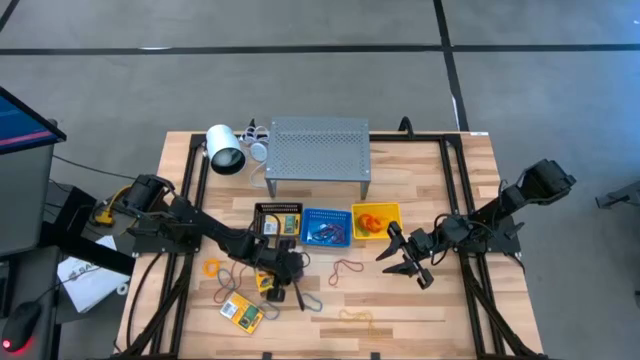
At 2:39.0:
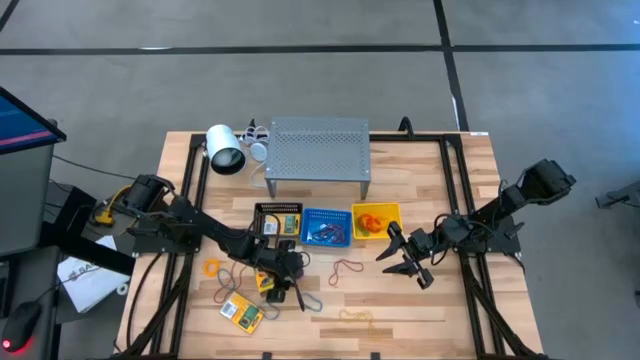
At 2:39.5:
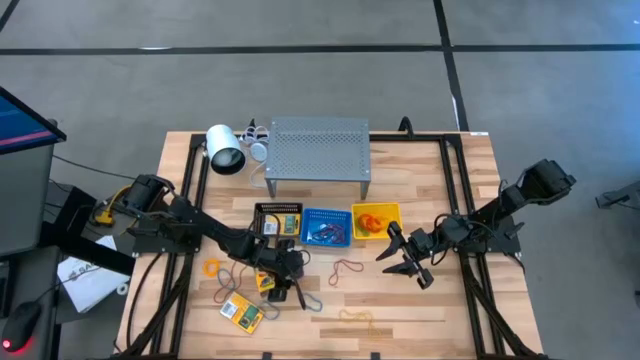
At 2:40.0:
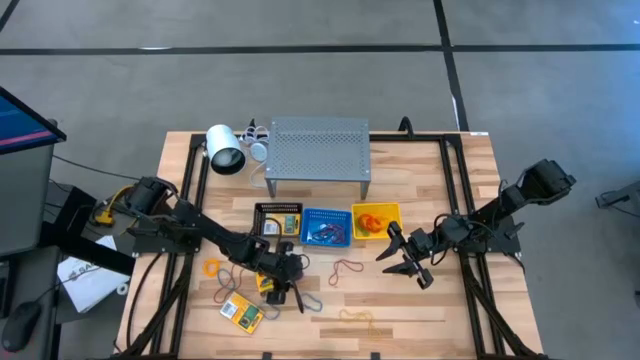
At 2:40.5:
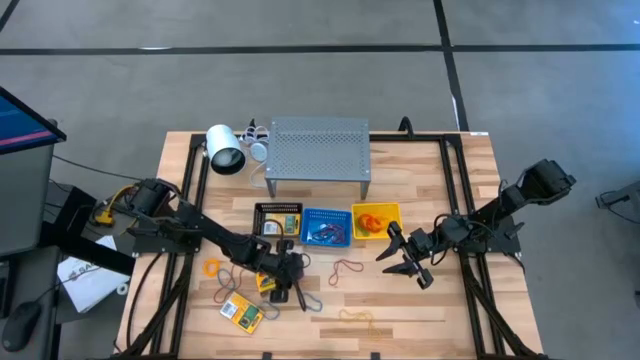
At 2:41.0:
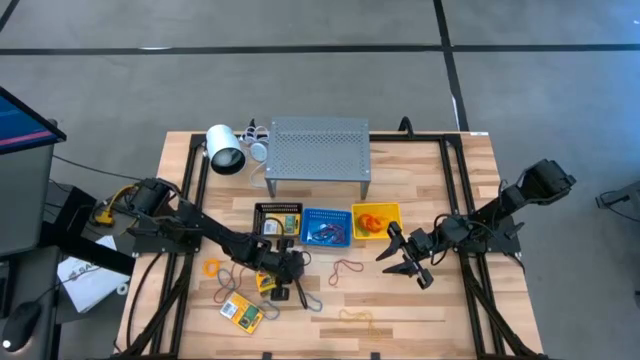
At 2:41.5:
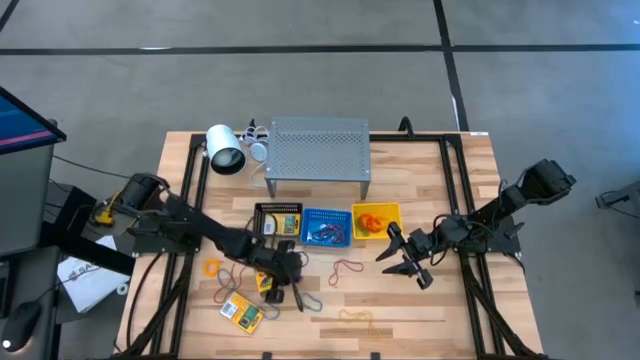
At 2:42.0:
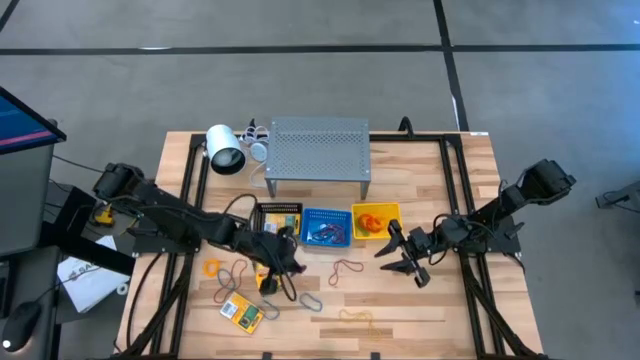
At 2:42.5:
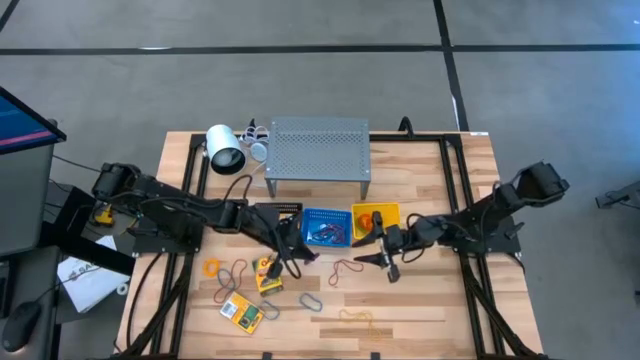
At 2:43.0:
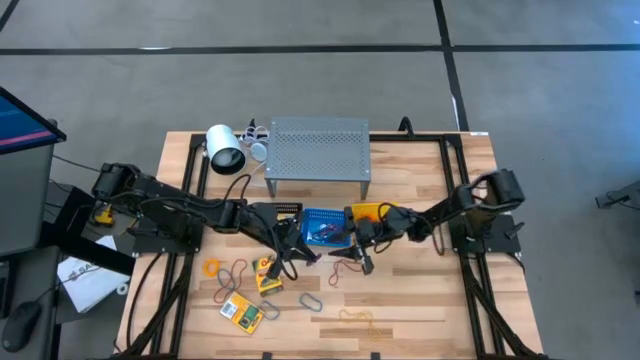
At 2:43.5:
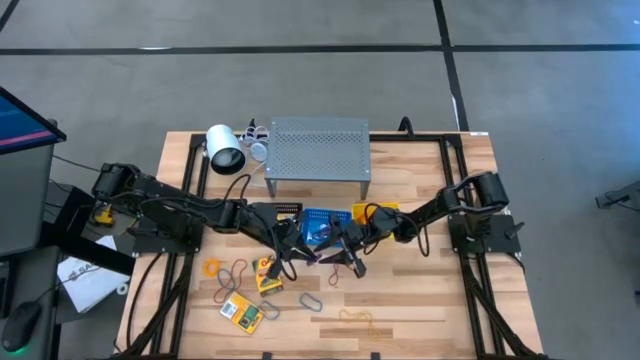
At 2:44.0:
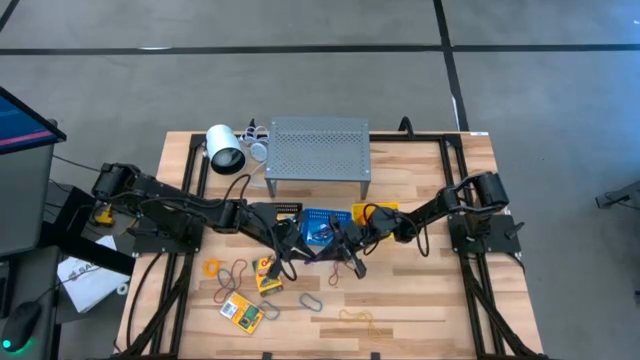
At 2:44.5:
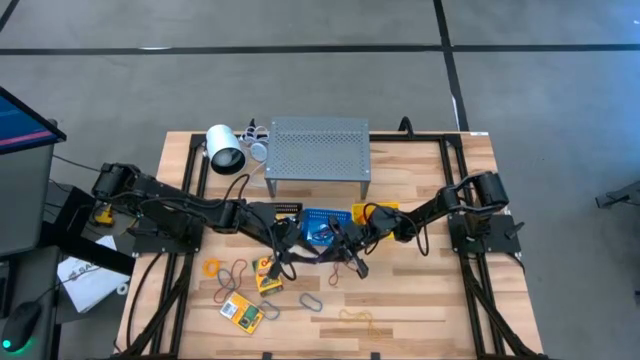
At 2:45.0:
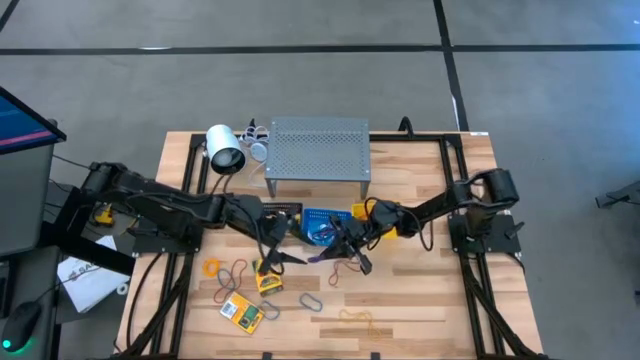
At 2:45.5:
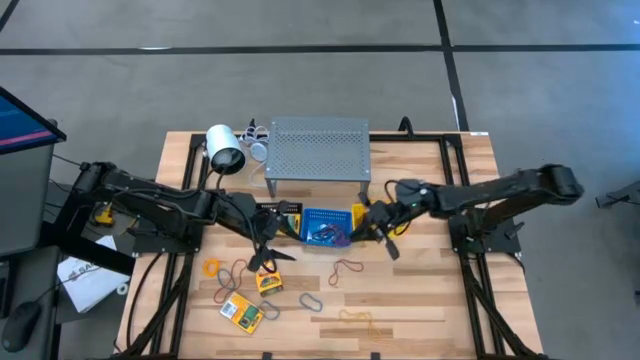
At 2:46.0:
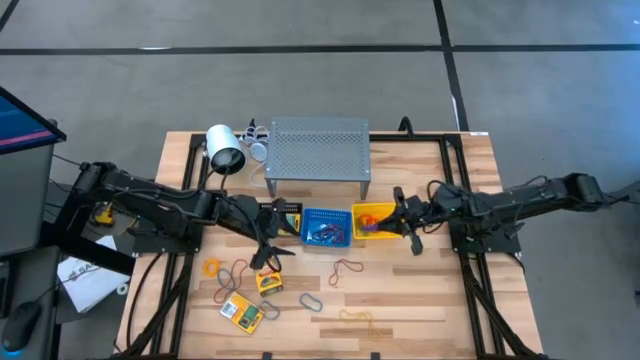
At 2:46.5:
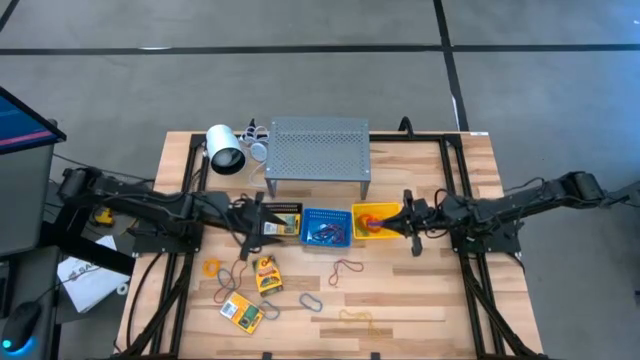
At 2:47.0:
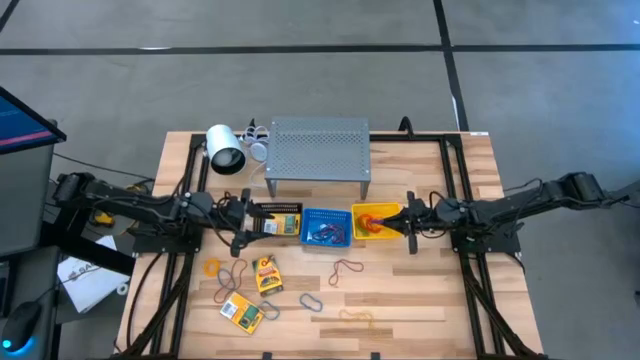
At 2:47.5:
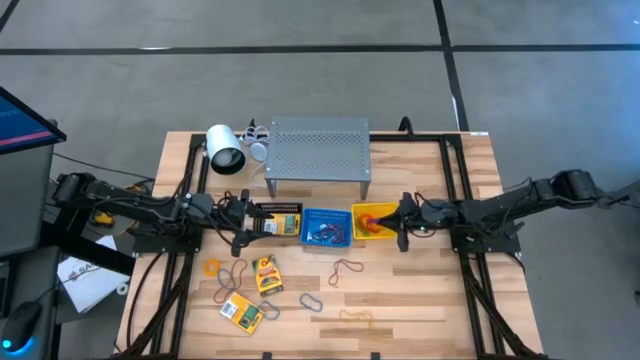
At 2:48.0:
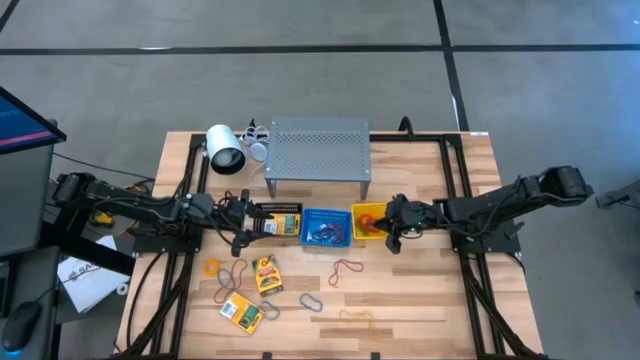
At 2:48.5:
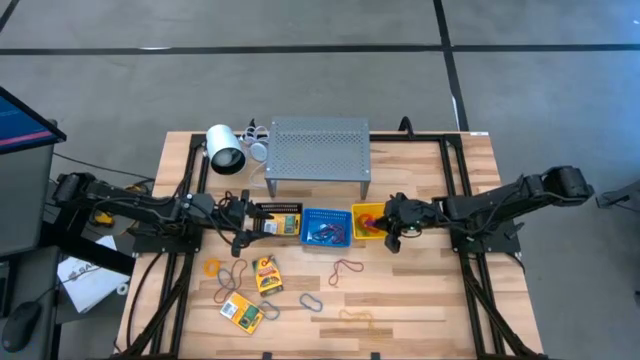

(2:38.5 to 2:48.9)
Task: Pick & Place Office Desk Supplies
Put the purple spiral keychain into the yellow bin

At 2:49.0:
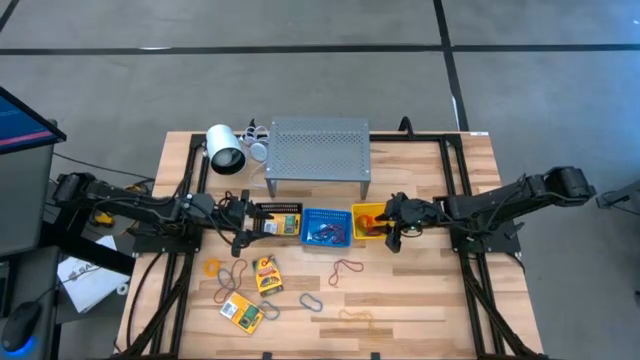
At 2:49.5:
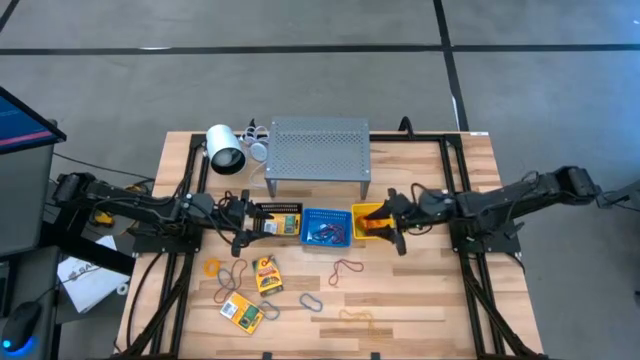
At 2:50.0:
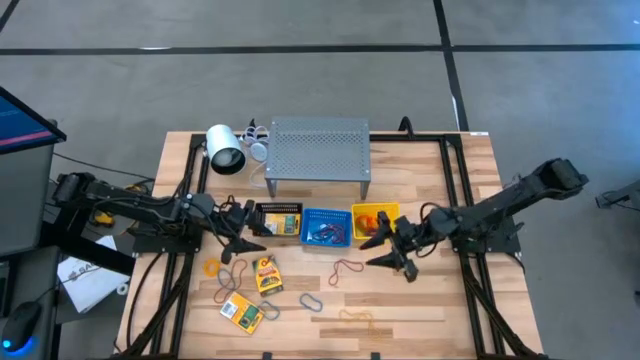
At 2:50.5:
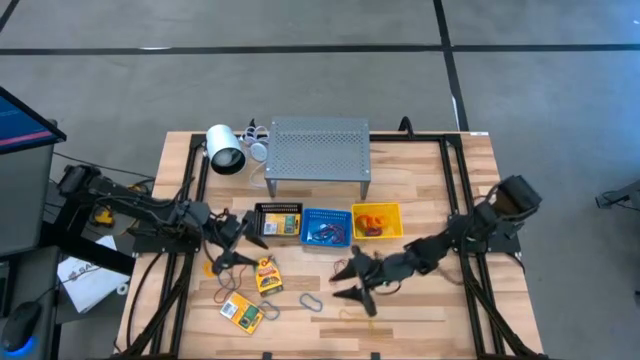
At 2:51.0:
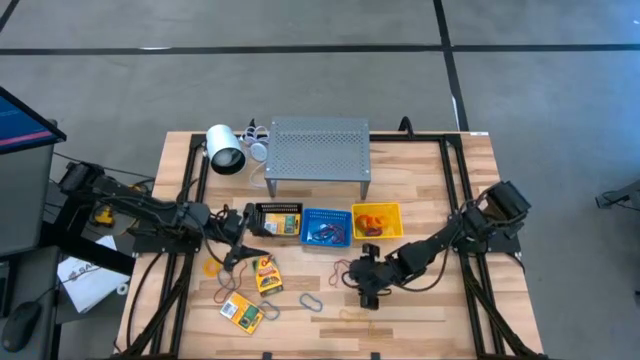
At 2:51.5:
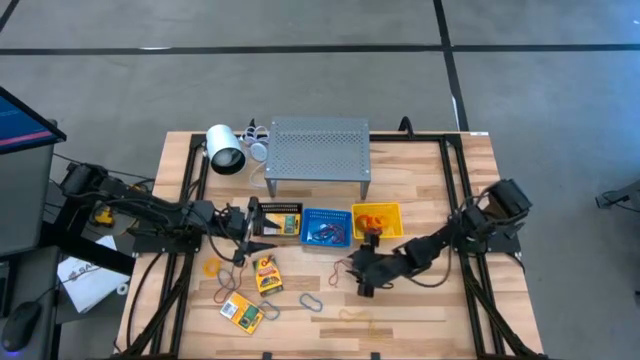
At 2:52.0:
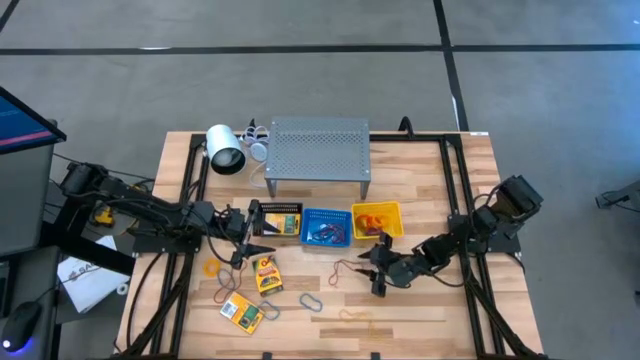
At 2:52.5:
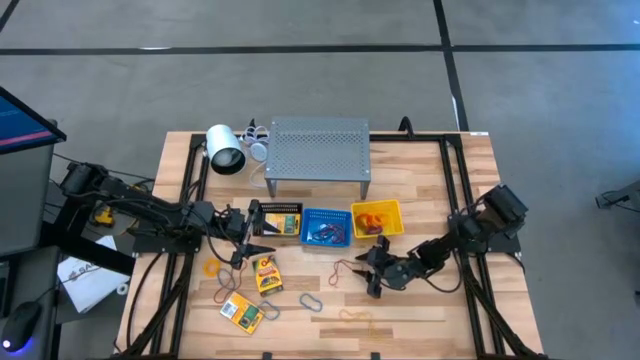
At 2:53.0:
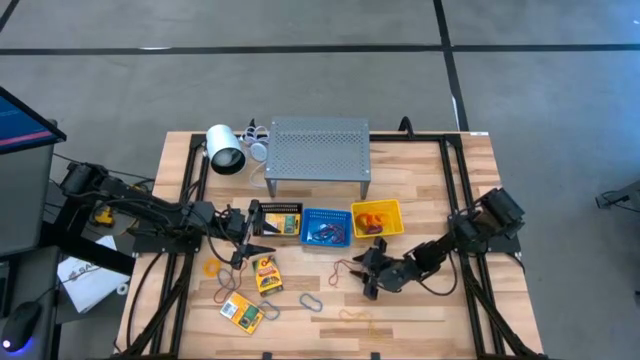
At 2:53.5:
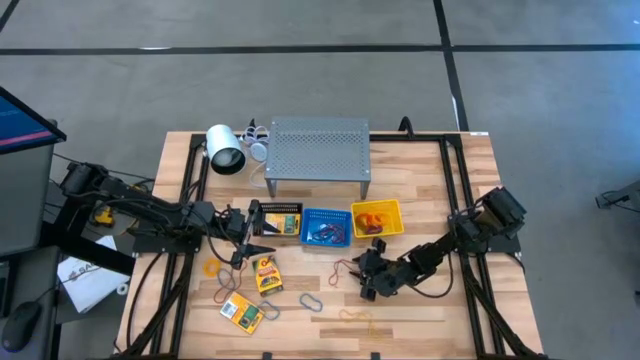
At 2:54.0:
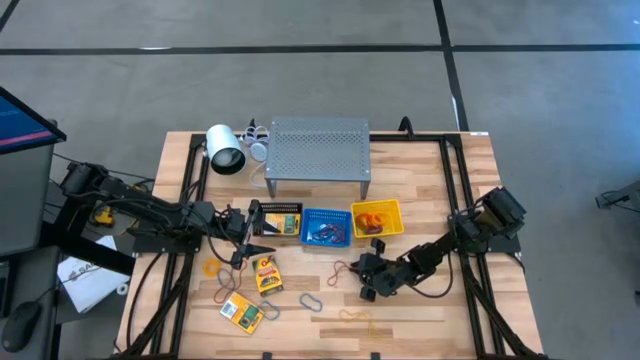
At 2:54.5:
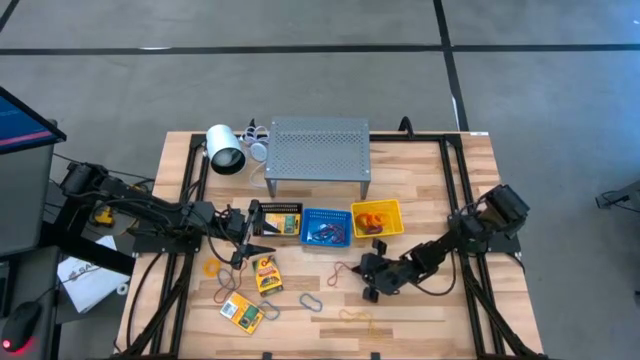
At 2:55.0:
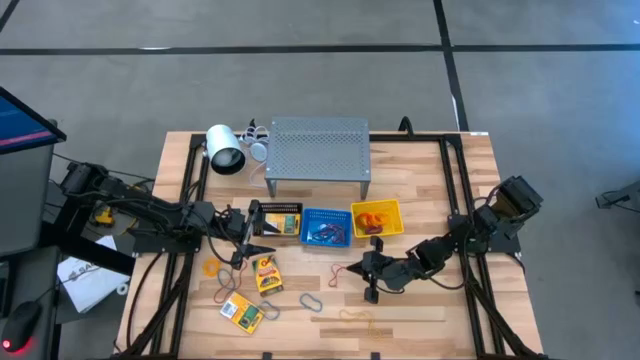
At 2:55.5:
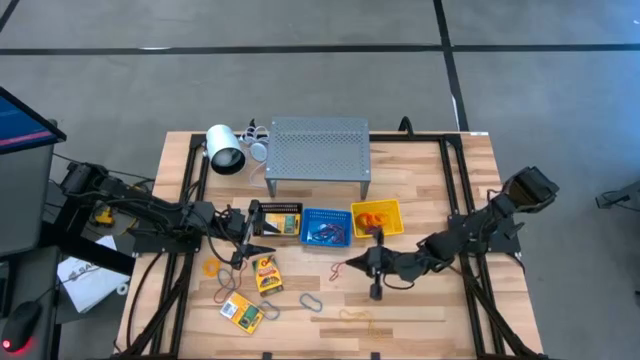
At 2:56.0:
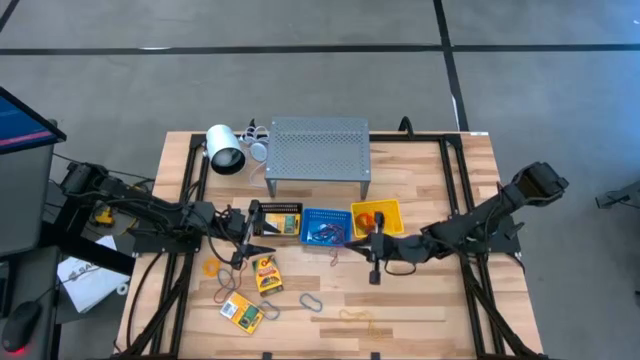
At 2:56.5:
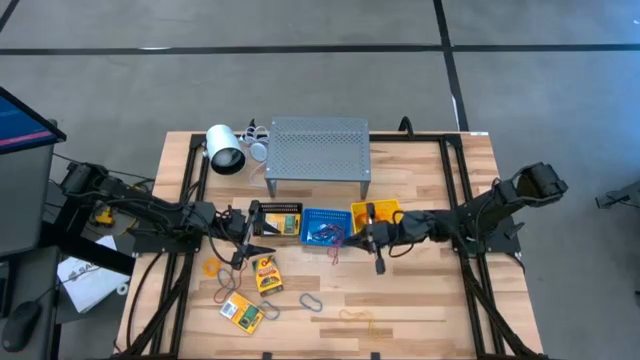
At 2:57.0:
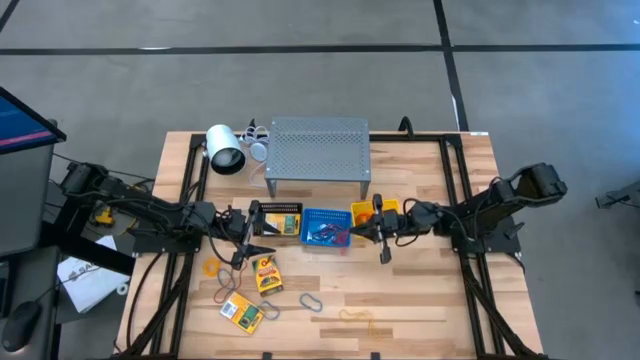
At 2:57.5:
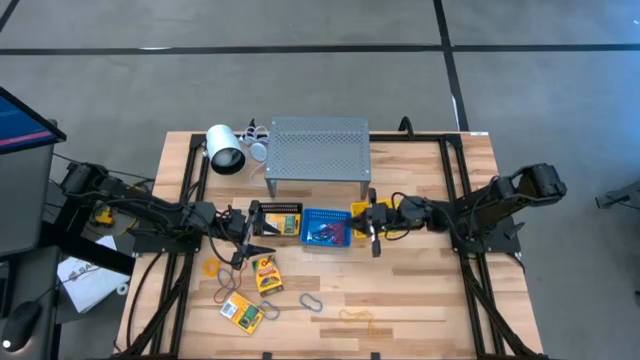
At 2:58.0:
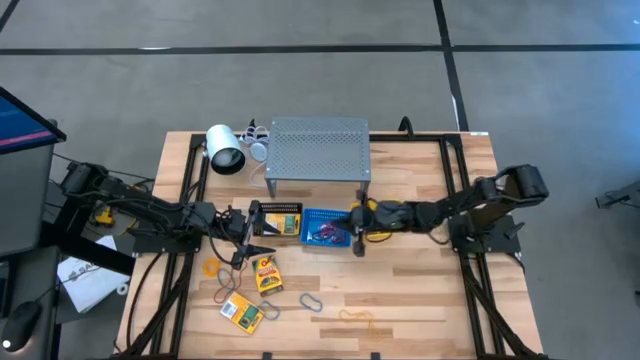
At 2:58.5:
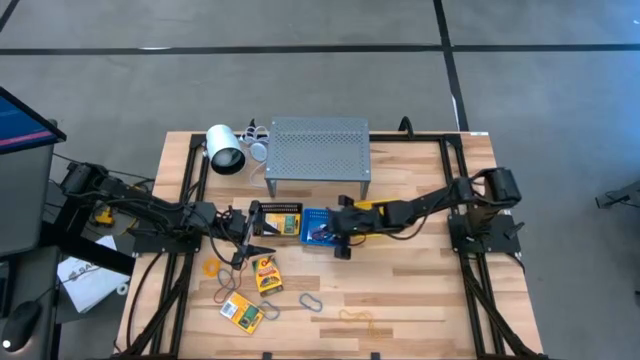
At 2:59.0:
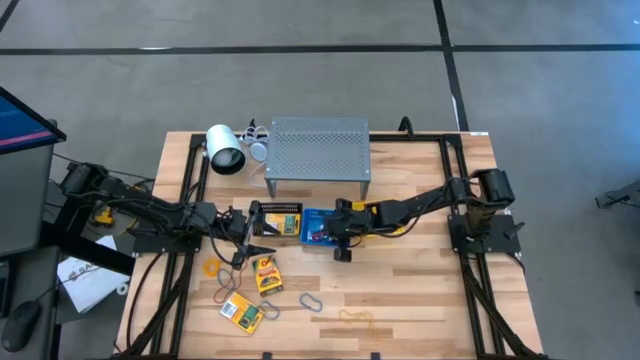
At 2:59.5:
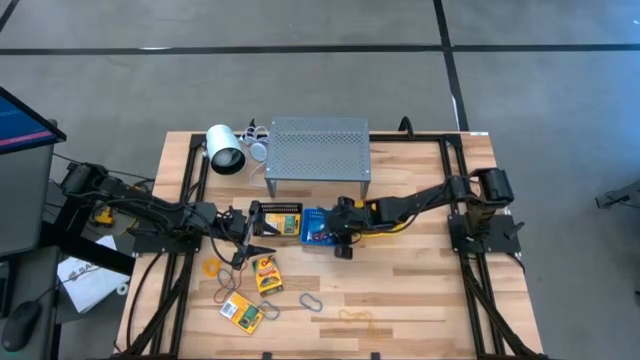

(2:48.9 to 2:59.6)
Put the red rubber band into the blue bin
